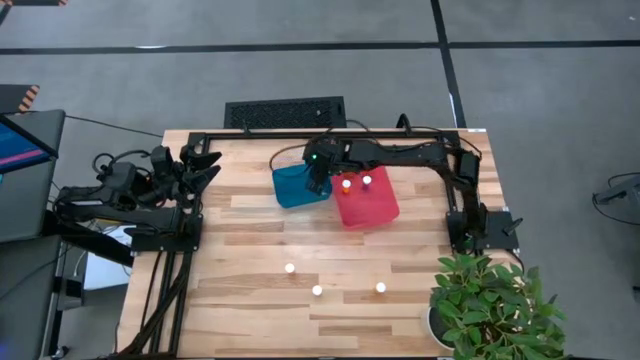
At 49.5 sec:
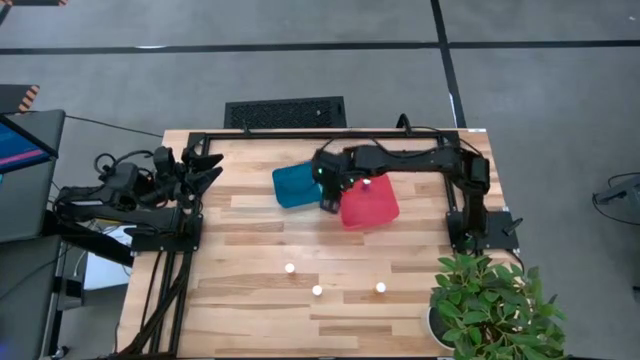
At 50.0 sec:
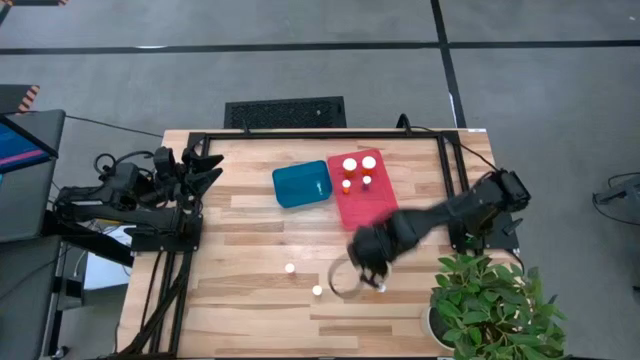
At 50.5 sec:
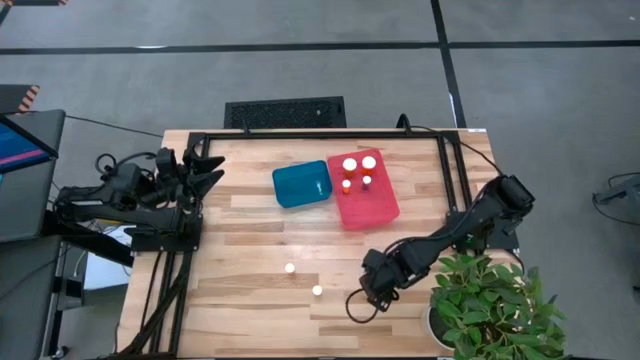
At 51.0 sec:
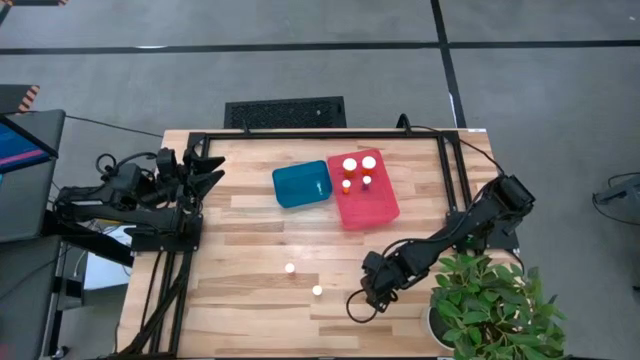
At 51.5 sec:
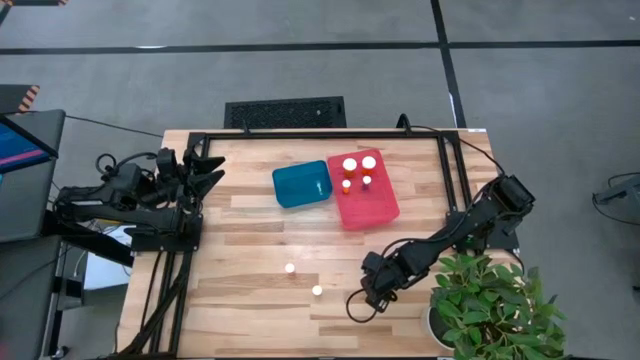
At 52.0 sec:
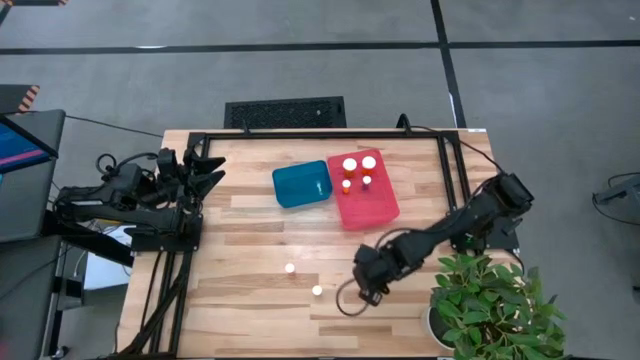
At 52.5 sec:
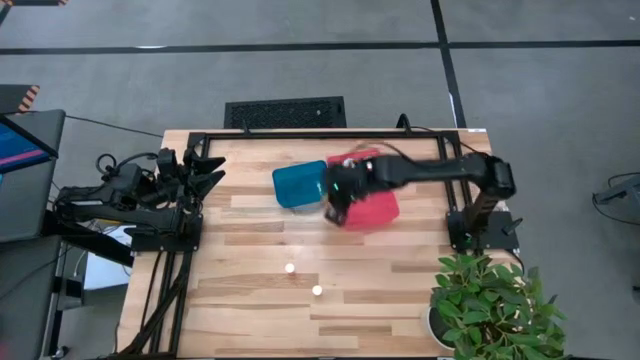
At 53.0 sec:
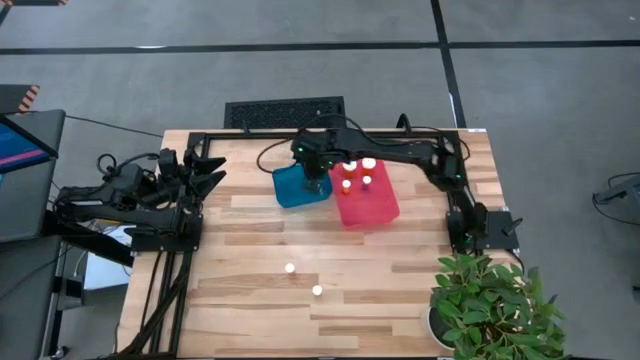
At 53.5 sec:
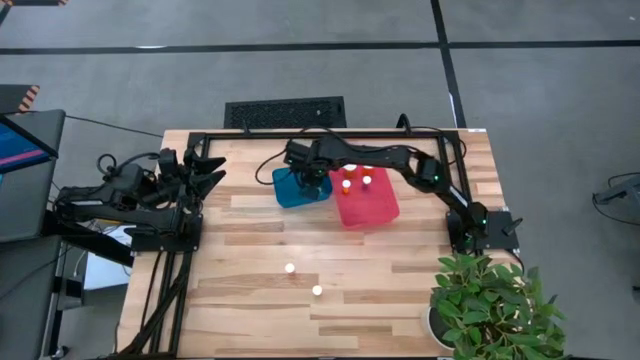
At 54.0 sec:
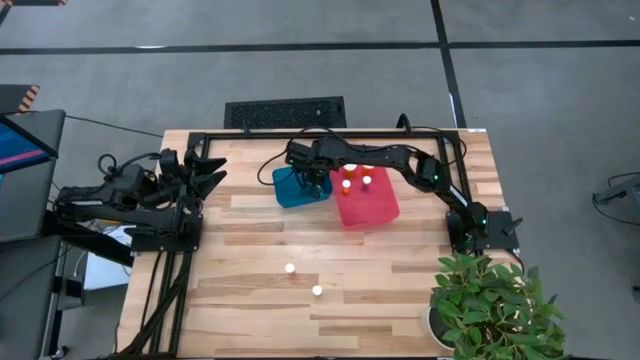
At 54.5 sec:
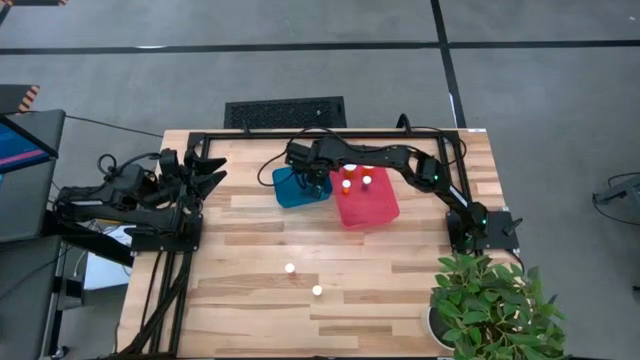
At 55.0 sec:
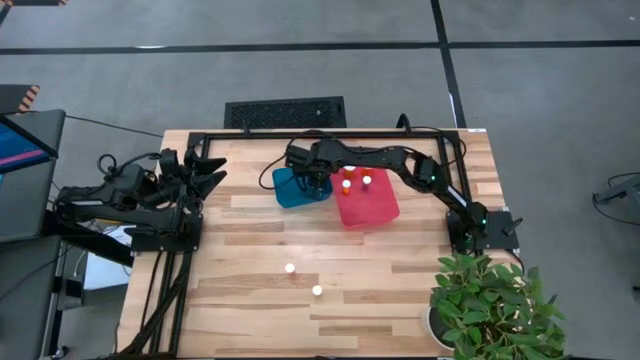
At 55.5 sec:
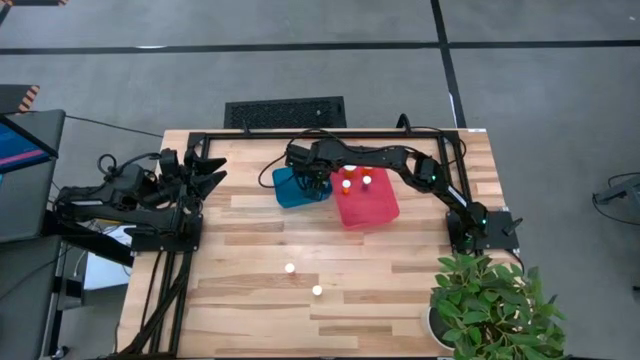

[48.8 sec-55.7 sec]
Task: Pick and place medicine bottles into bin by pill shape (circle, oval)
Put the orange pill bottle into the blue bin

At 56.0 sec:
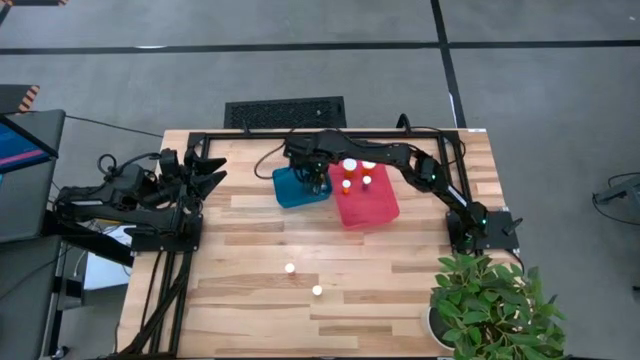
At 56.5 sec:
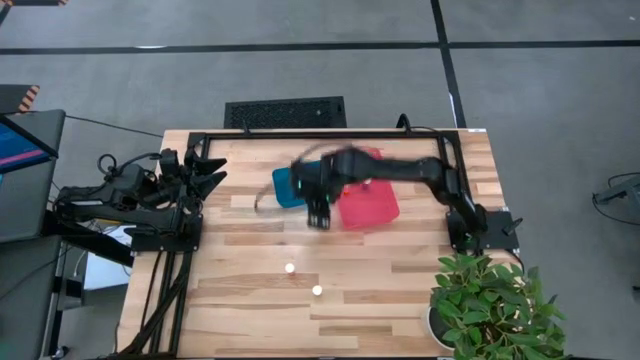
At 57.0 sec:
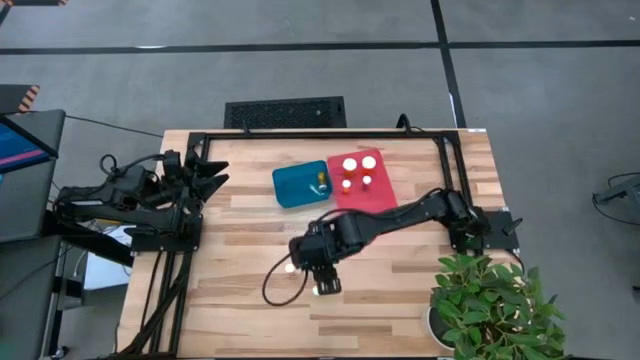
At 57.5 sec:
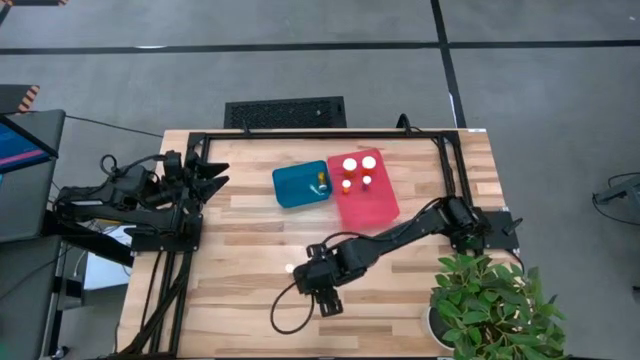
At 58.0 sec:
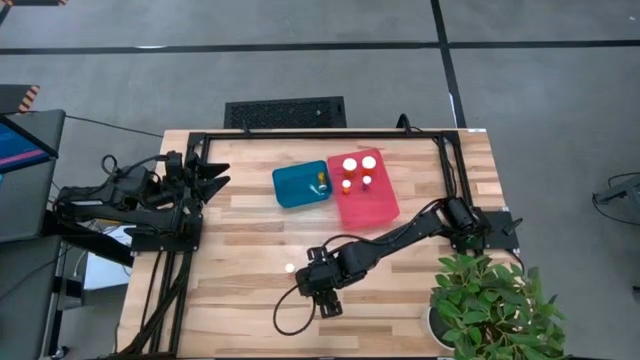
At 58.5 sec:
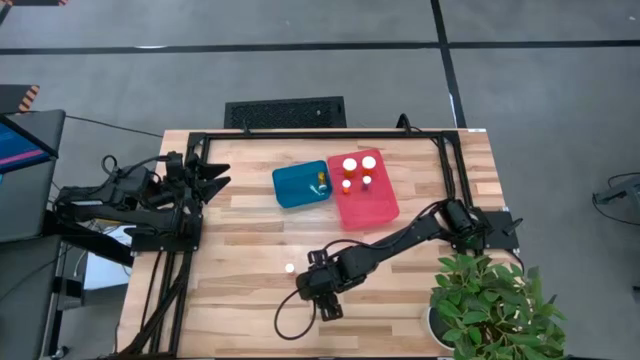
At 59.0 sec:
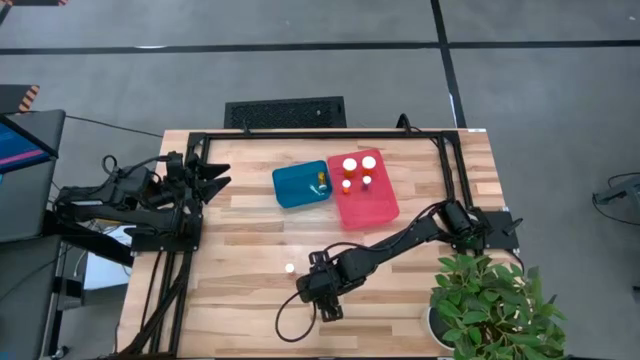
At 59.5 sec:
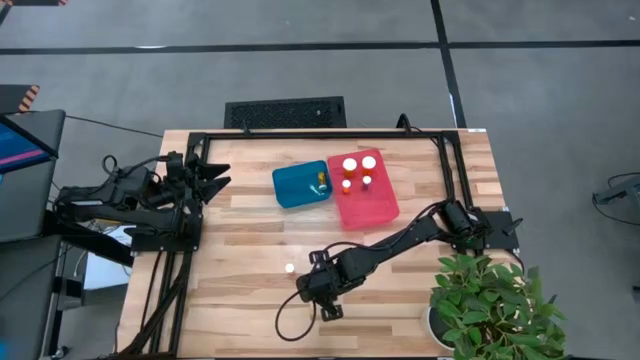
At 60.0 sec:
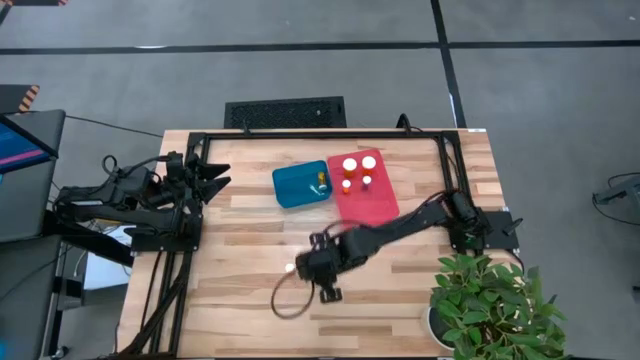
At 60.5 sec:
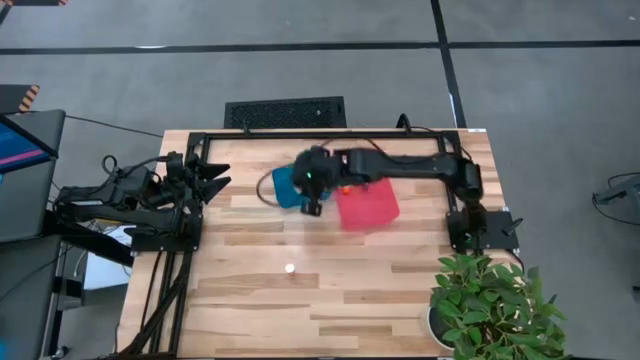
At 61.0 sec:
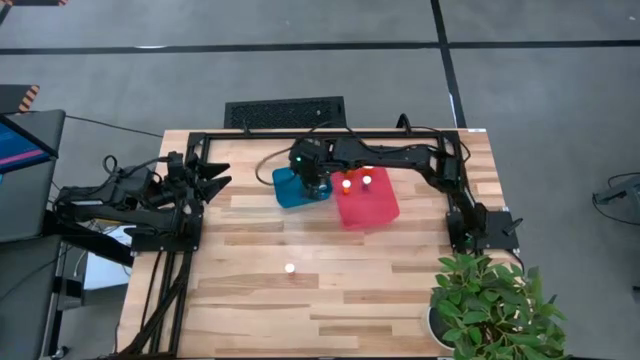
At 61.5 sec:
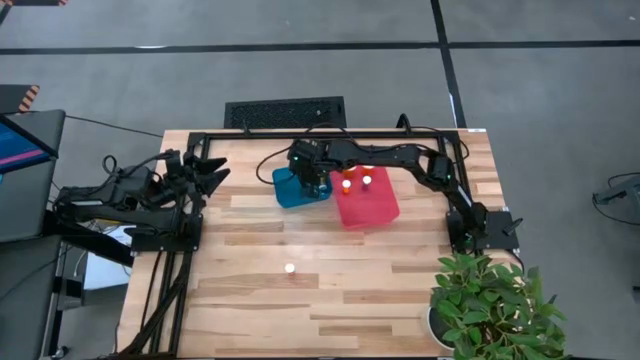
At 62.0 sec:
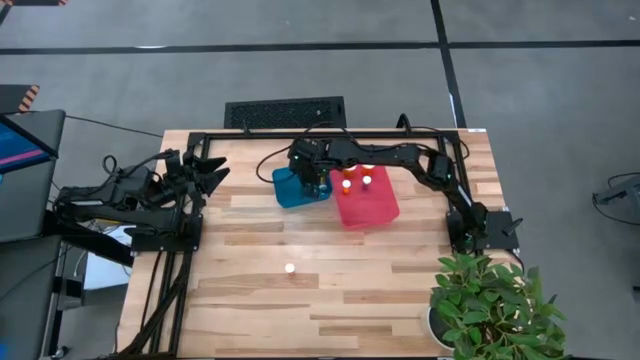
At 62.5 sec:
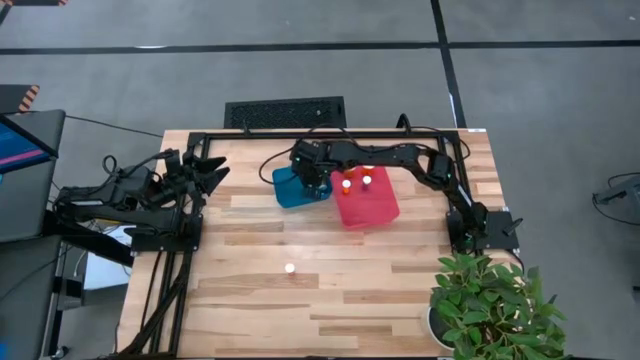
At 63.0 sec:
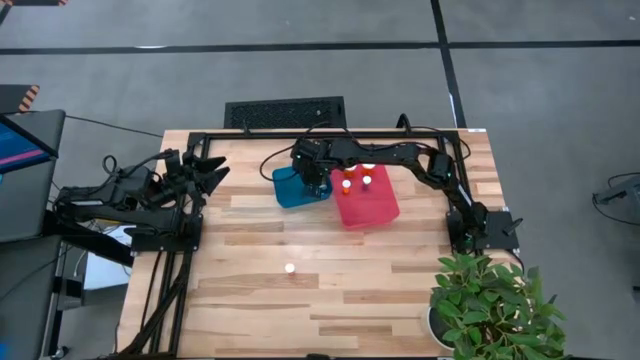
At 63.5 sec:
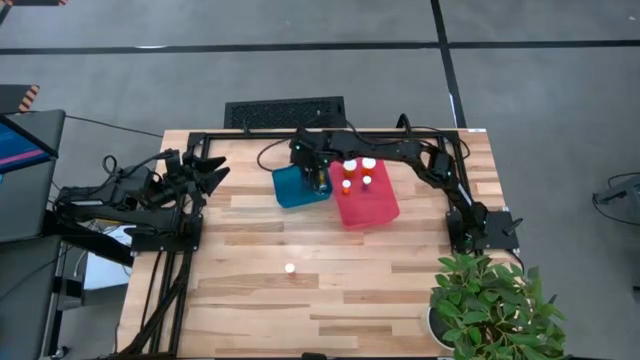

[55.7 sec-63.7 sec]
Put the yellow pill bottle into the blue bin

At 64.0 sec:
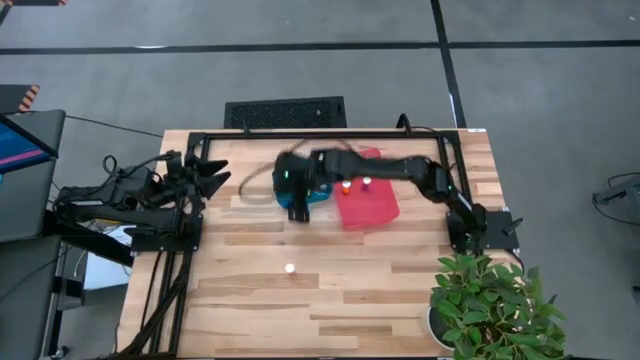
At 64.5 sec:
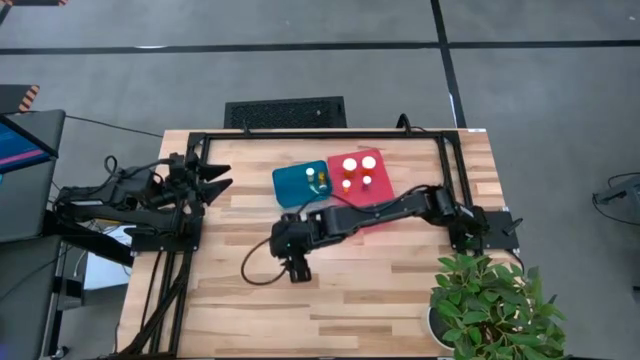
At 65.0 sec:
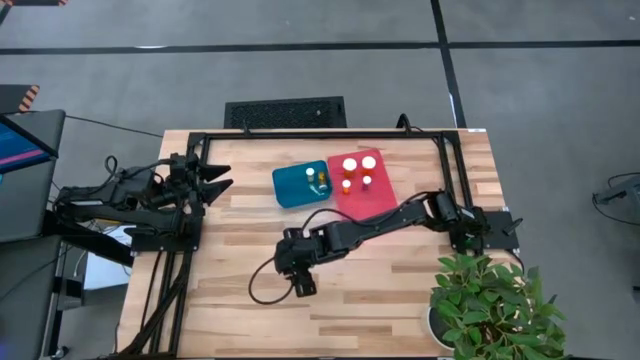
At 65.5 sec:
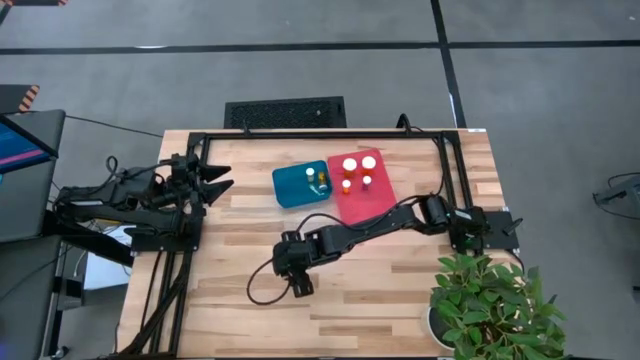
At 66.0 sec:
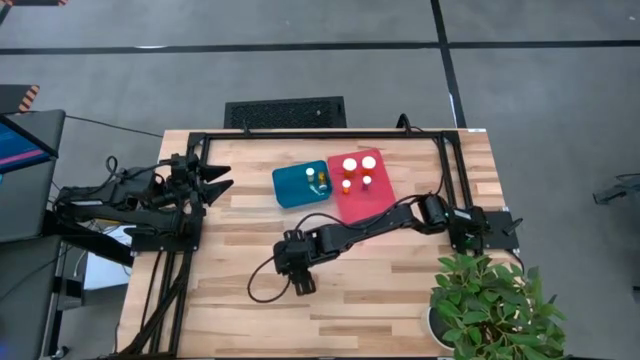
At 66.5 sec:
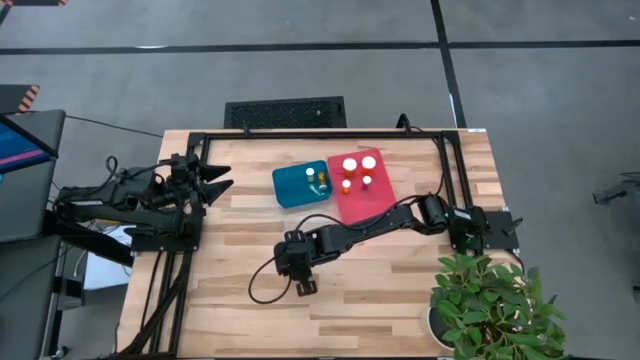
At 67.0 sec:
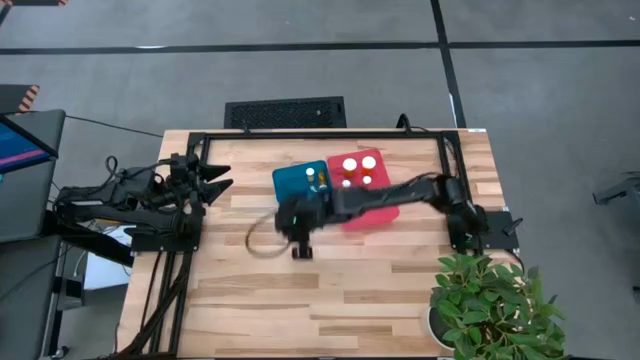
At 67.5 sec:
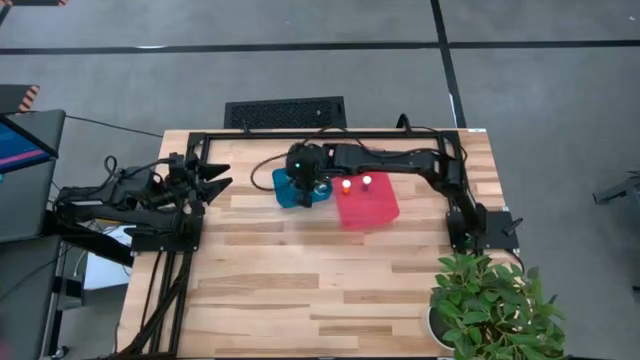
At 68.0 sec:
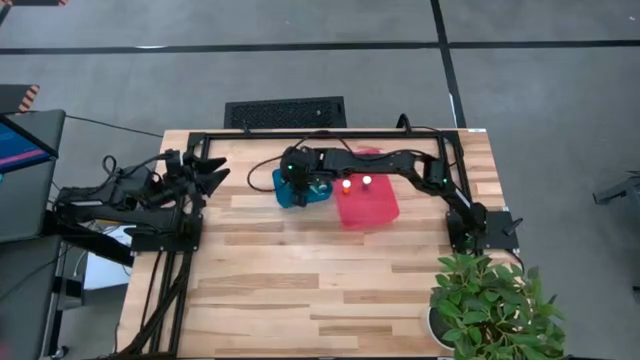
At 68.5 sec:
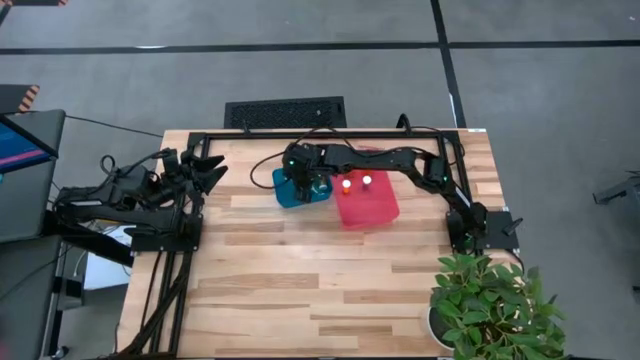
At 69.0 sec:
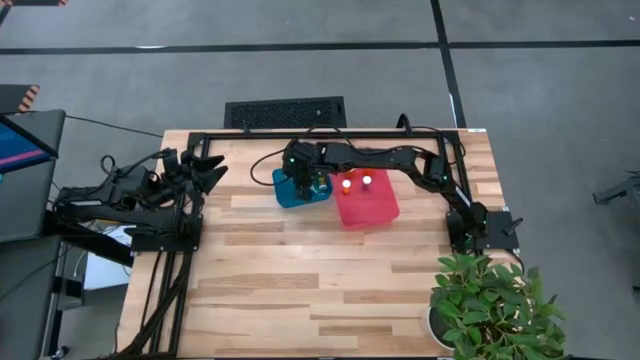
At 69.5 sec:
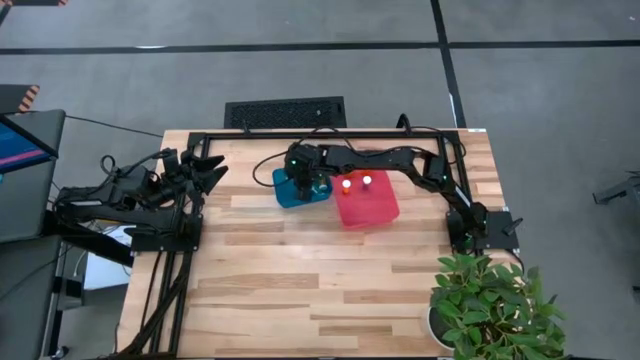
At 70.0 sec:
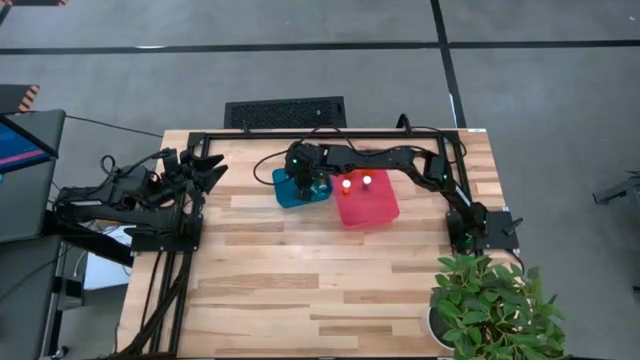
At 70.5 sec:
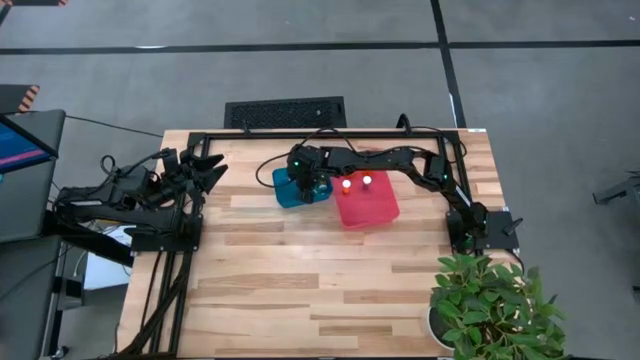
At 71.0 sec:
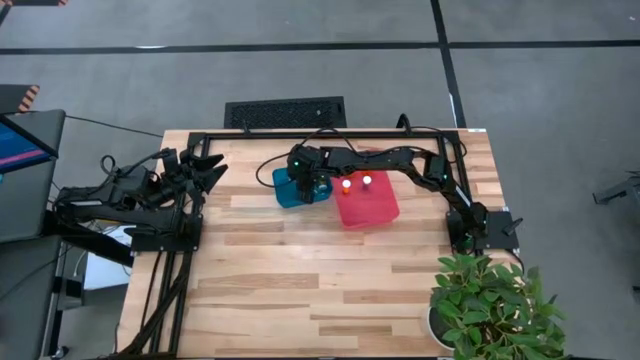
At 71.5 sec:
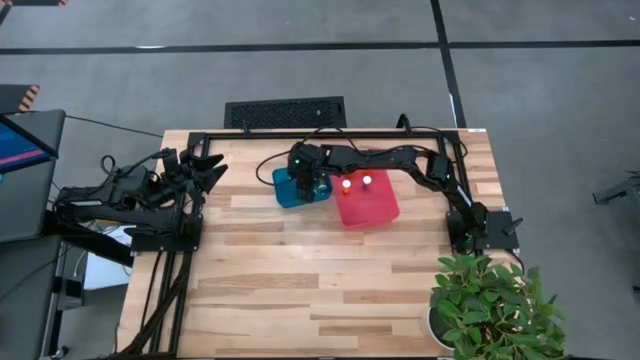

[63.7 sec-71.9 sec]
Put the red pill bottle into the blue bin
